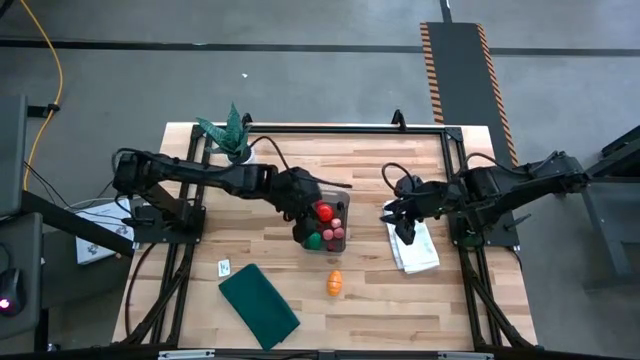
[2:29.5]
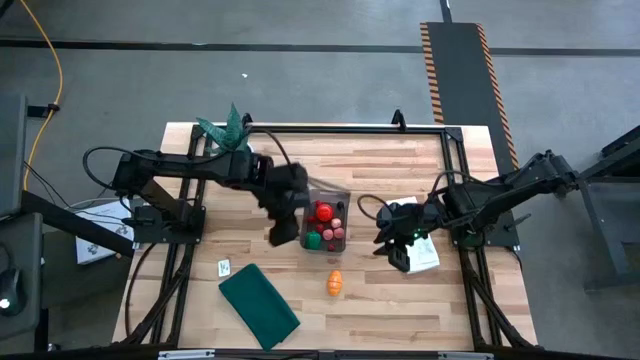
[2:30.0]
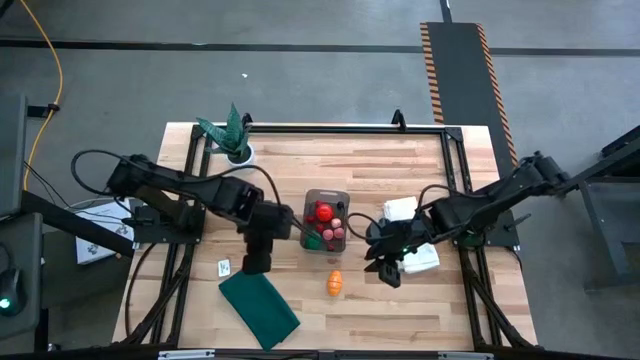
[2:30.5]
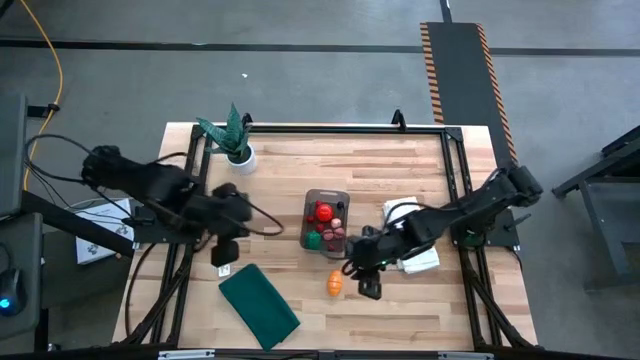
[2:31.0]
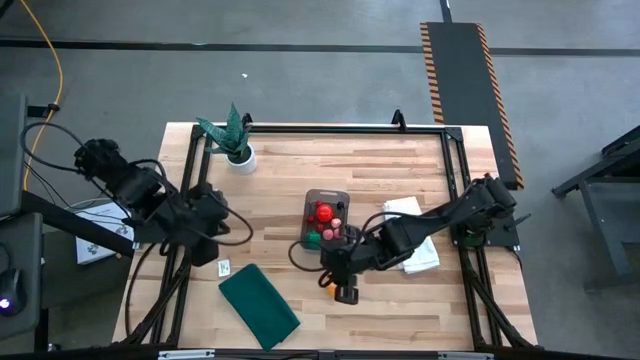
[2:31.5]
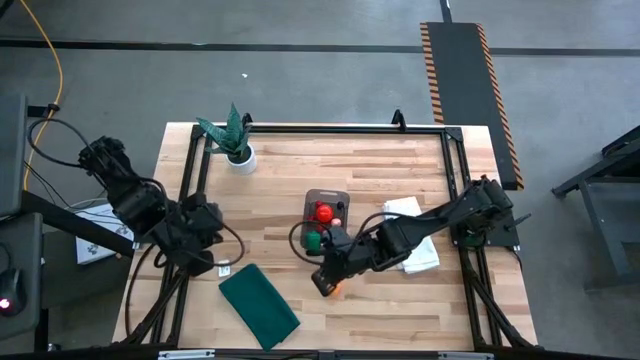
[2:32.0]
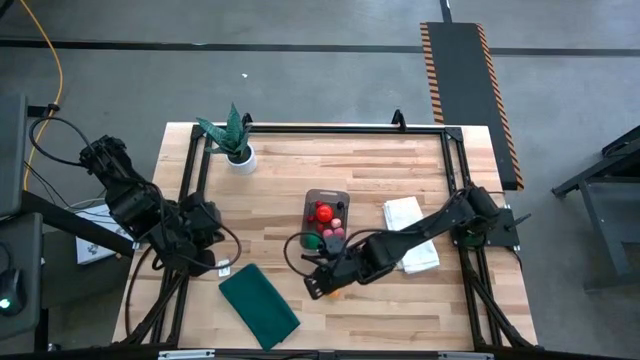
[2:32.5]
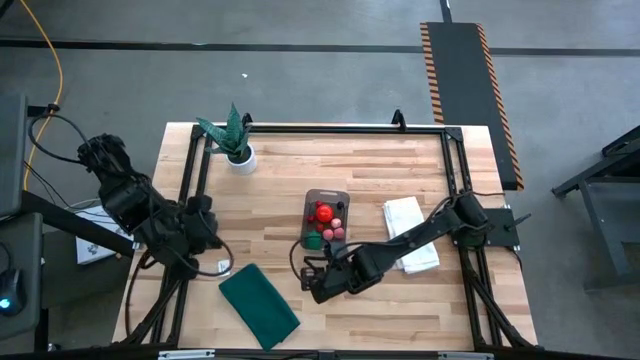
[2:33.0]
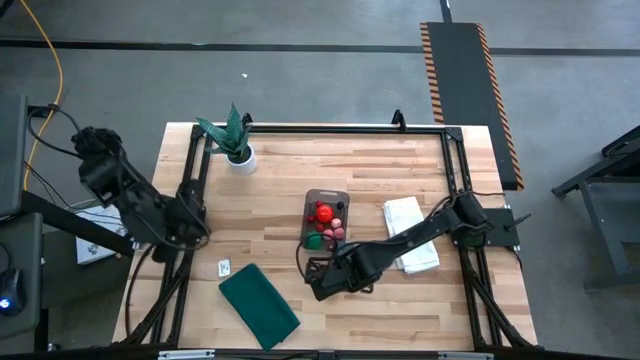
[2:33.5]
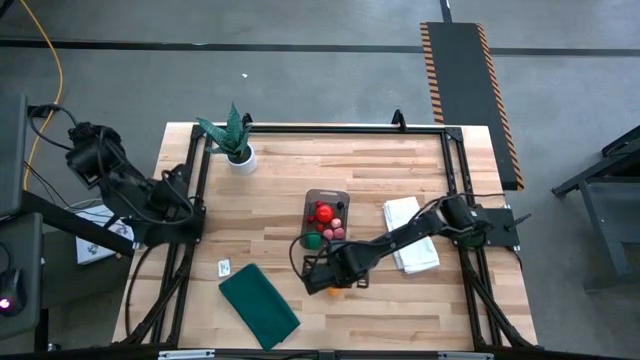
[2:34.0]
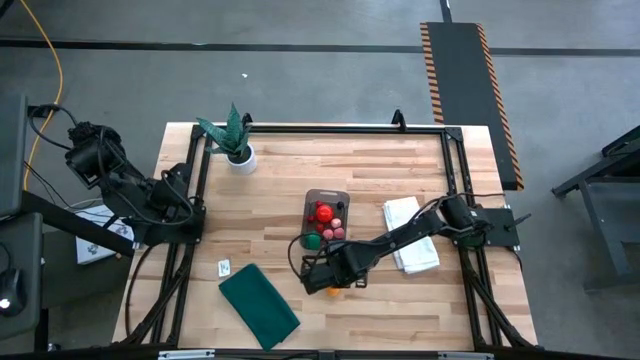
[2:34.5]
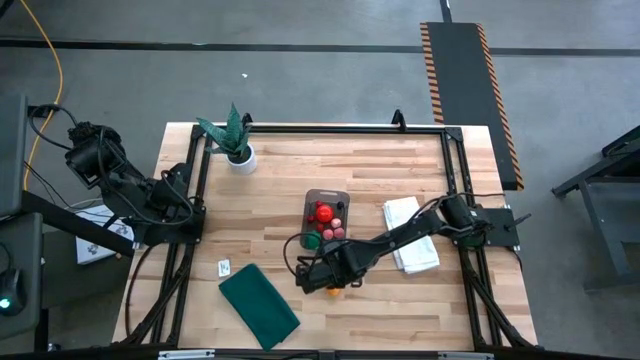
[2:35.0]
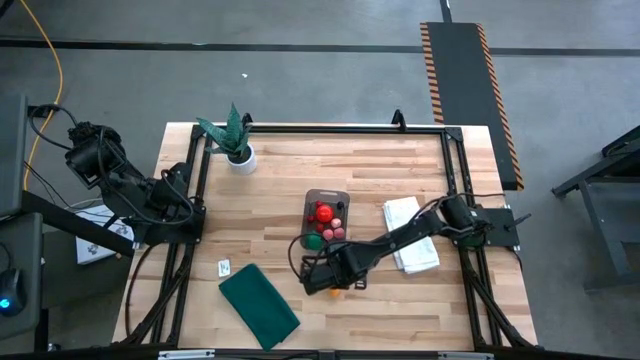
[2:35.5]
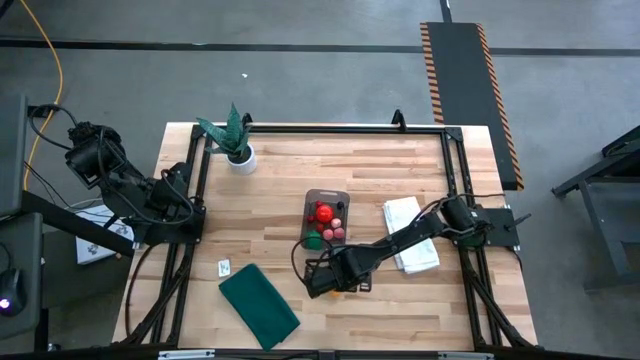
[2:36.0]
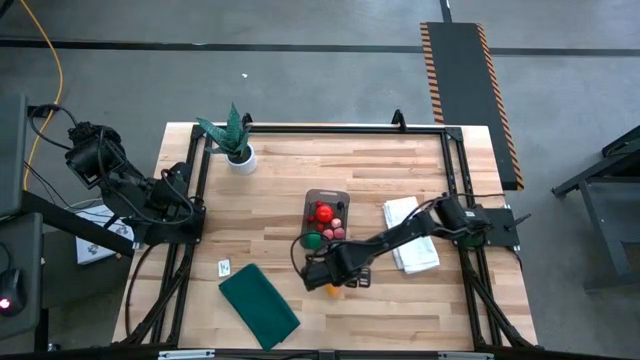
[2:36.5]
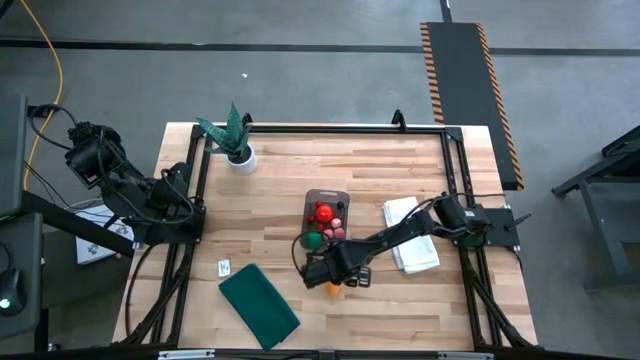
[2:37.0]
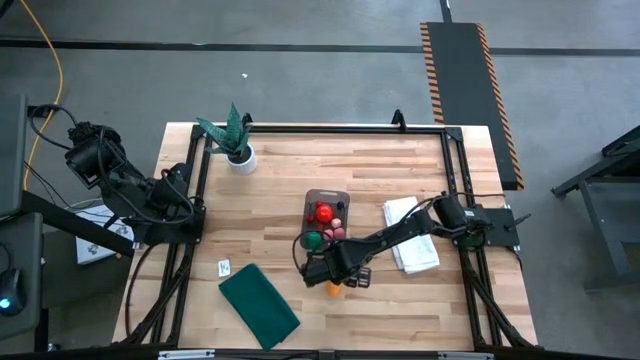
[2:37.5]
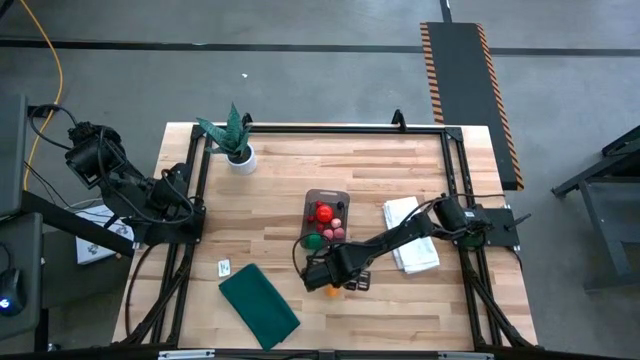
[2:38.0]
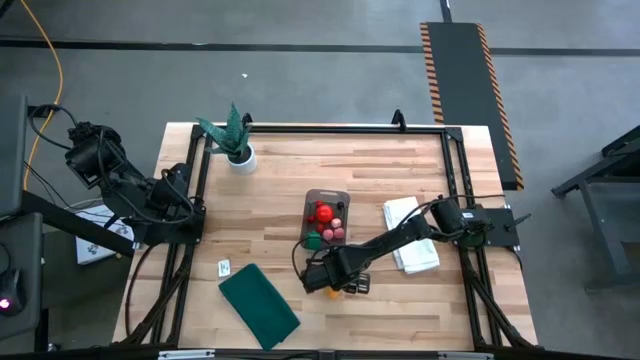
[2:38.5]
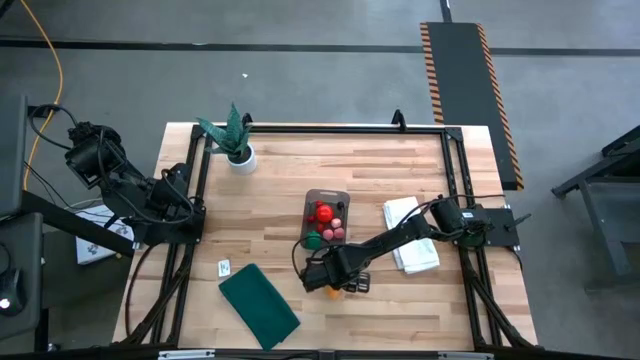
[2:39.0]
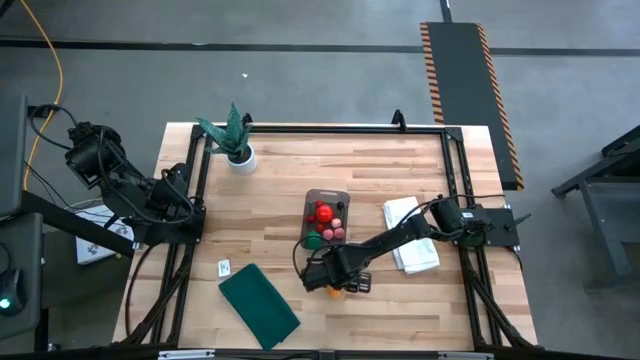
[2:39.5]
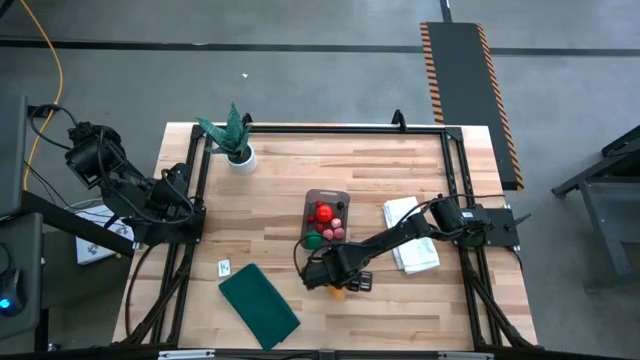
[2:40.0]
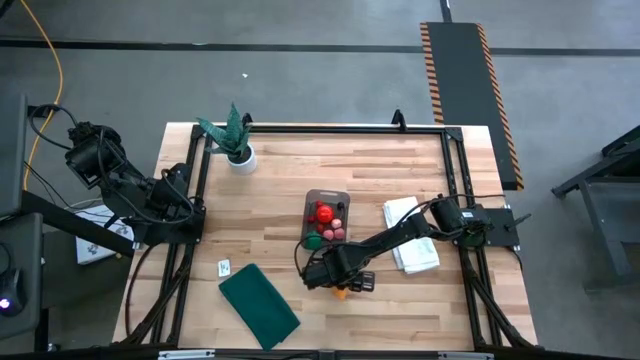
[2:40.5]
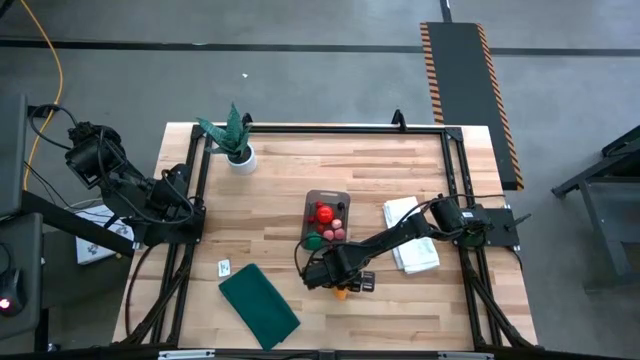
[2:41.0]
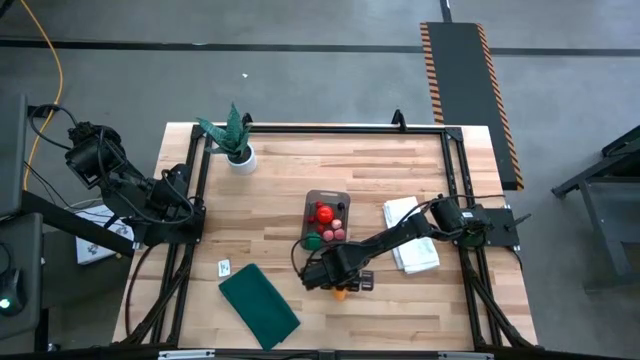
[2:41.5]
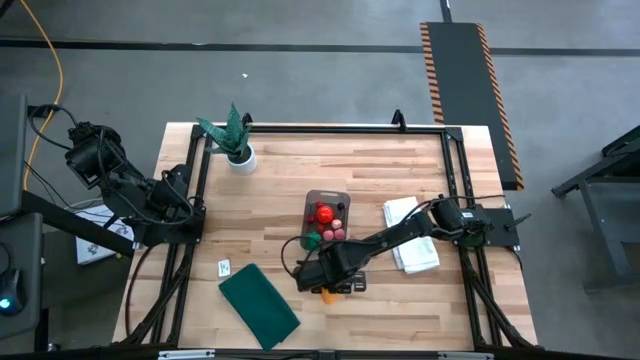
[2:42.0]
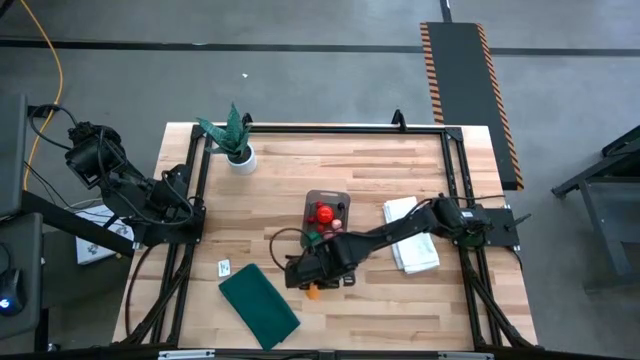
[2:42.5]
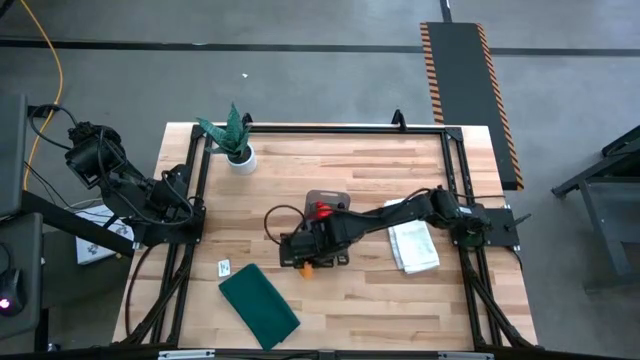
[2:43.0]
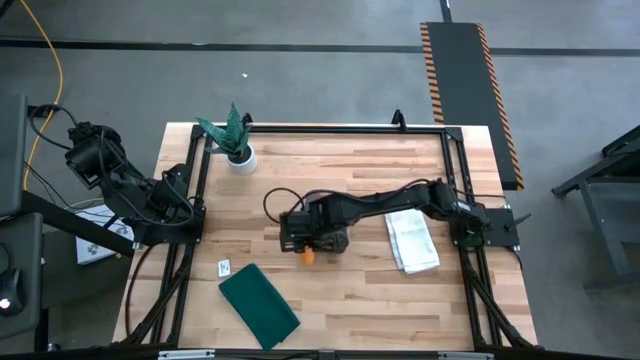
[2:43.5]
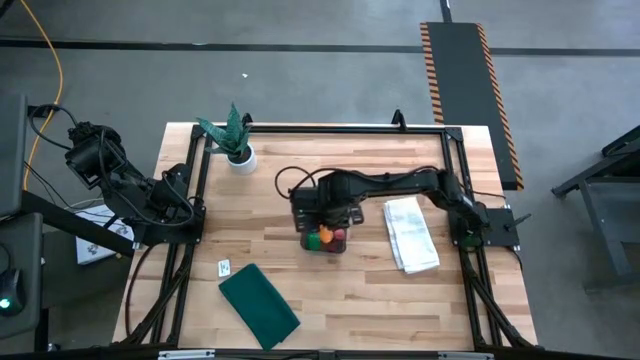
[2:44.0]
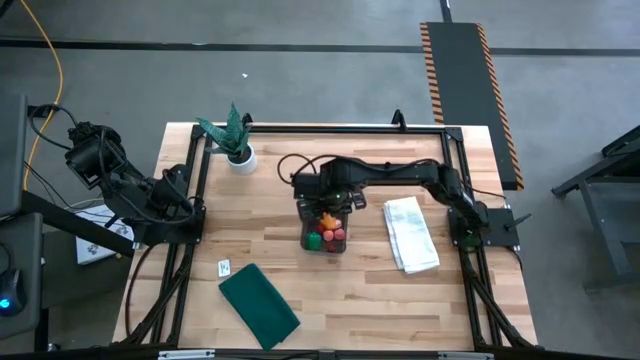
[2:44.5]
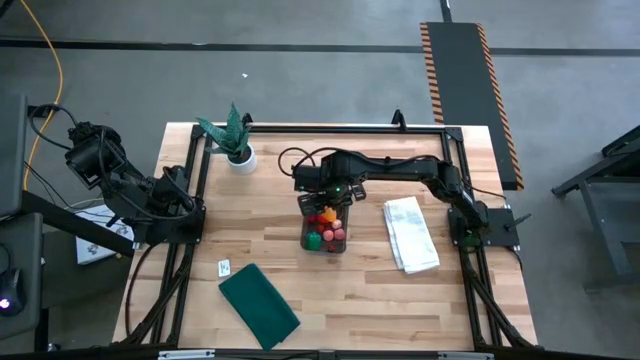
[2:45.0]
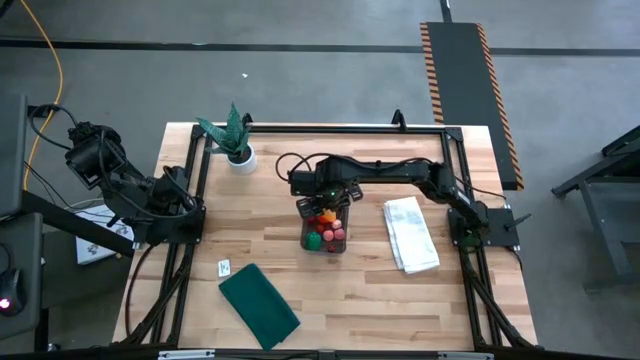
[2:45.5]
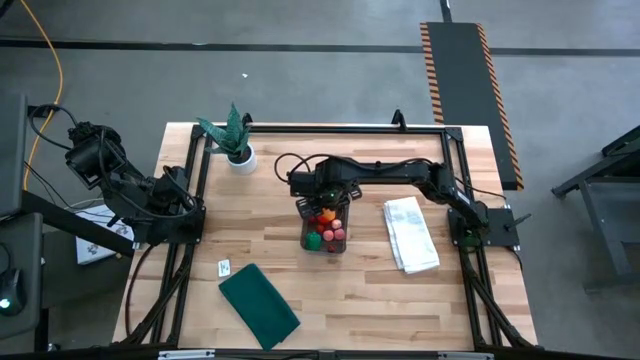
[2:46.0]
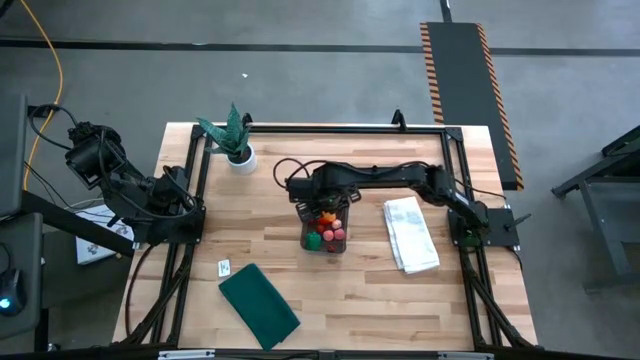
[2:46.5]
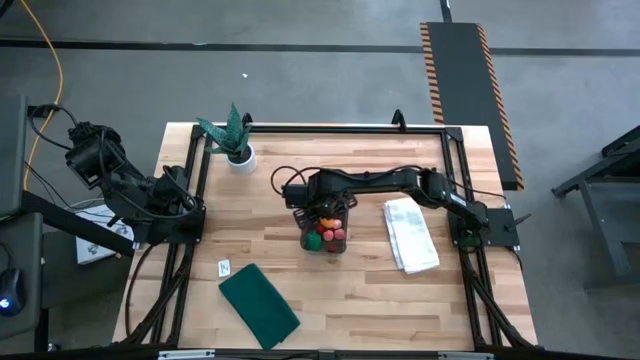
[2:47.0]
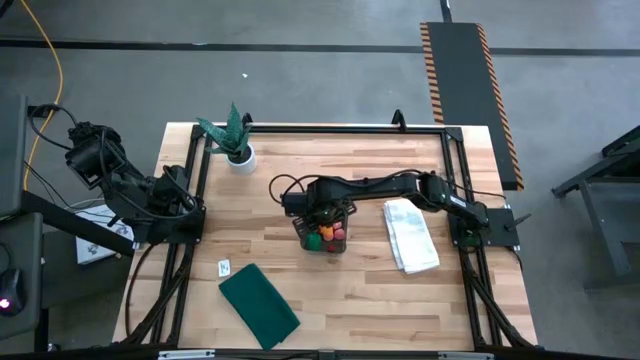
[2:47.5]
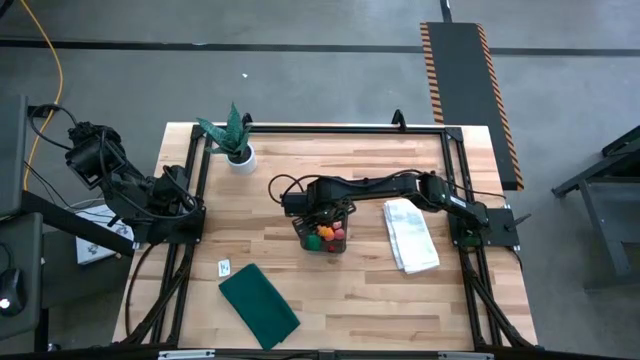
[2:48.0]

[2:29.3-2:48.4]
Task: Pick and placing Produce into tupperware
Put the yellow squash into the transparent black bin
